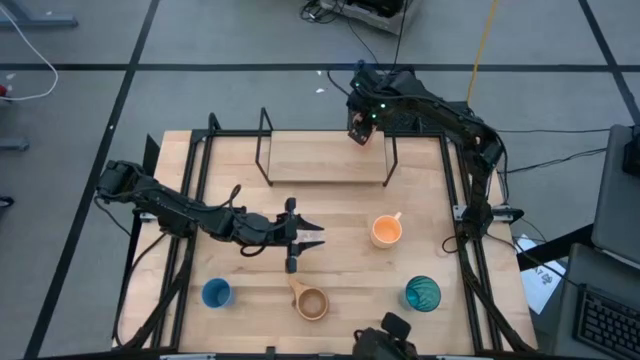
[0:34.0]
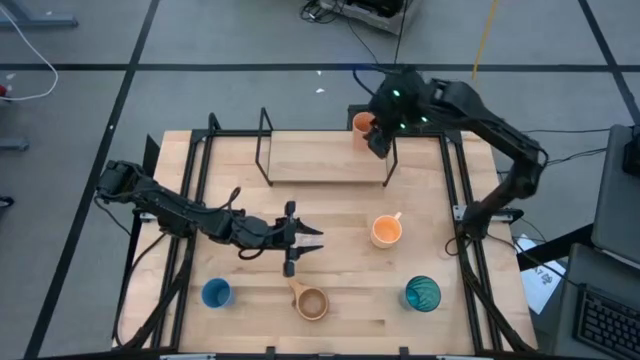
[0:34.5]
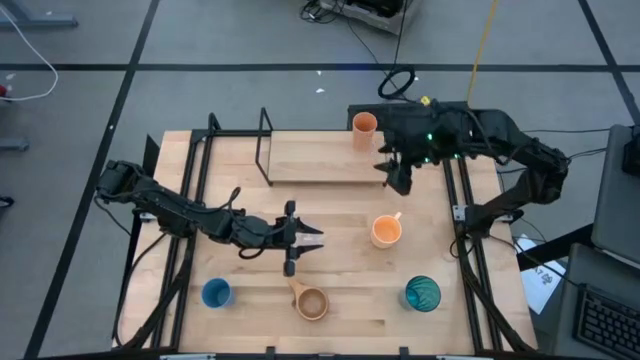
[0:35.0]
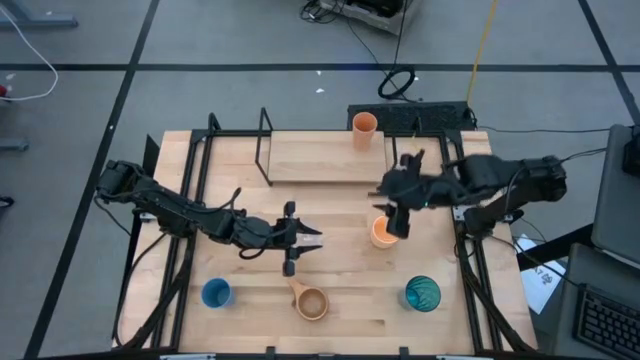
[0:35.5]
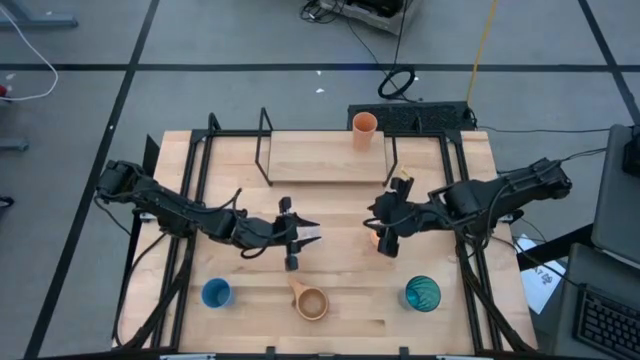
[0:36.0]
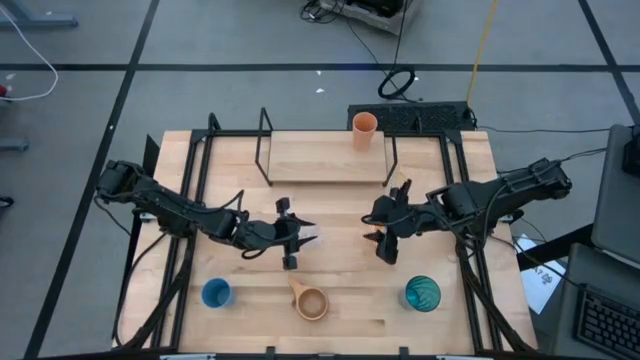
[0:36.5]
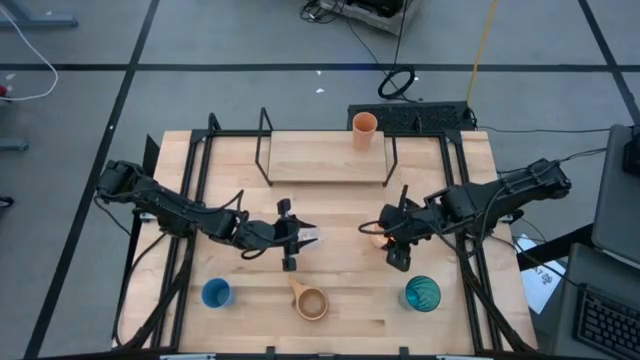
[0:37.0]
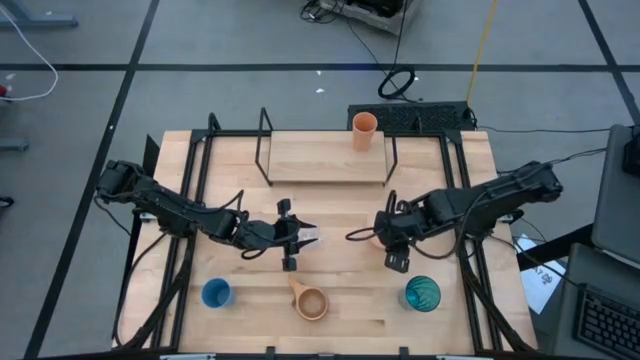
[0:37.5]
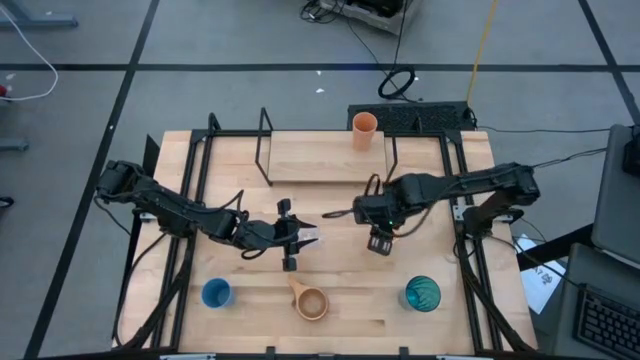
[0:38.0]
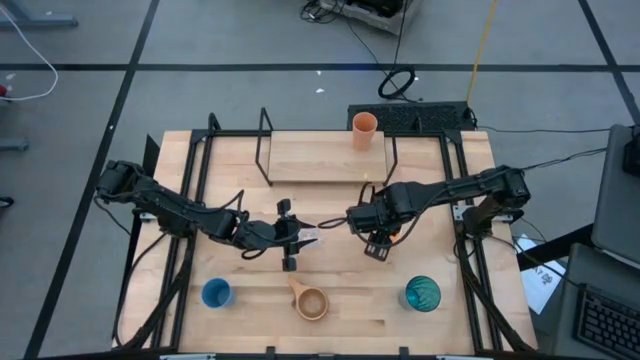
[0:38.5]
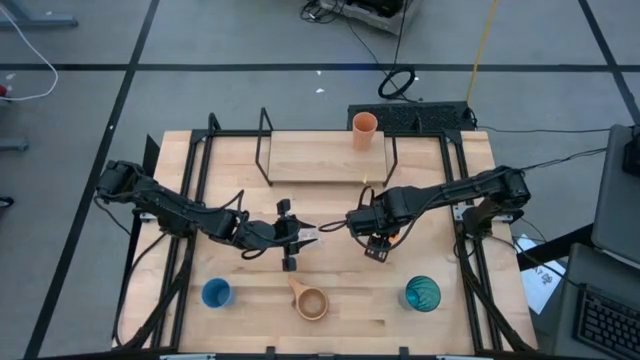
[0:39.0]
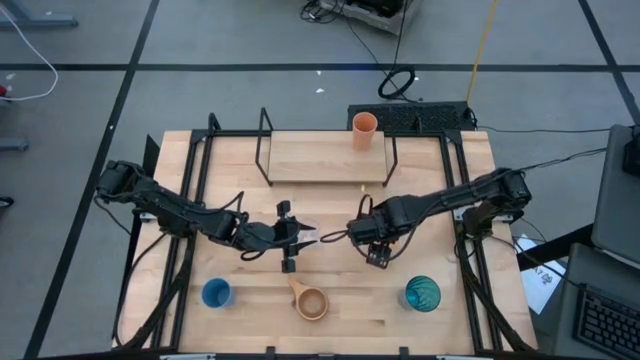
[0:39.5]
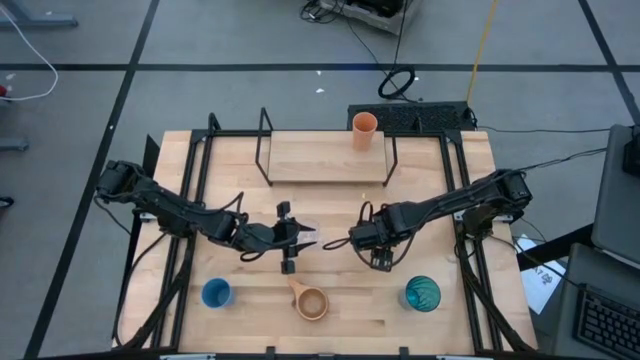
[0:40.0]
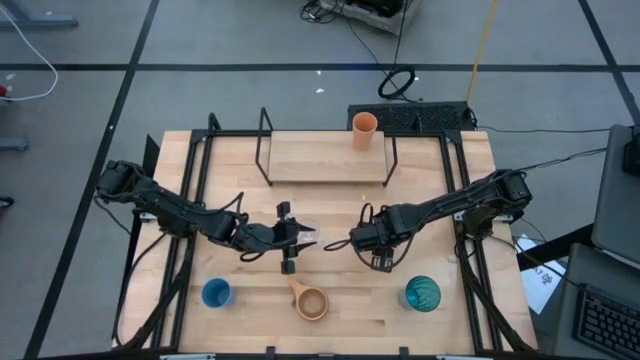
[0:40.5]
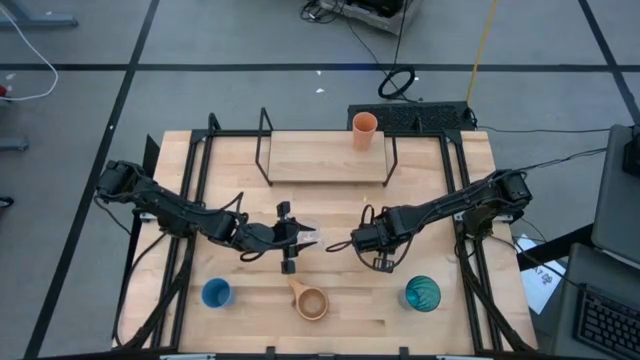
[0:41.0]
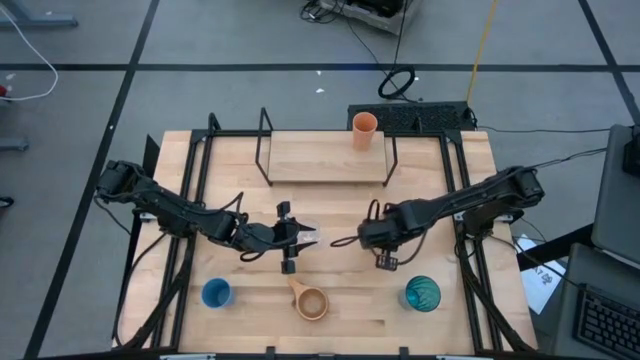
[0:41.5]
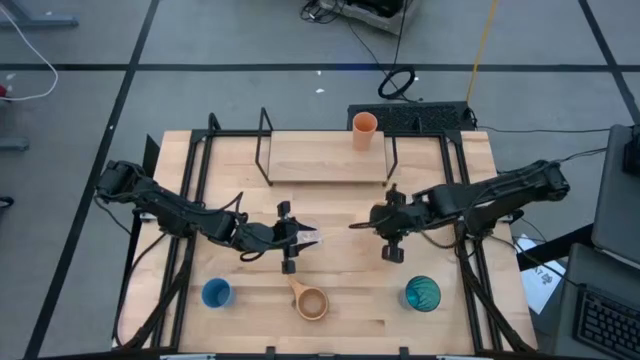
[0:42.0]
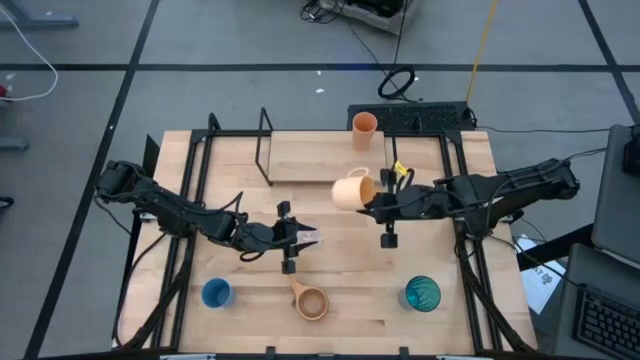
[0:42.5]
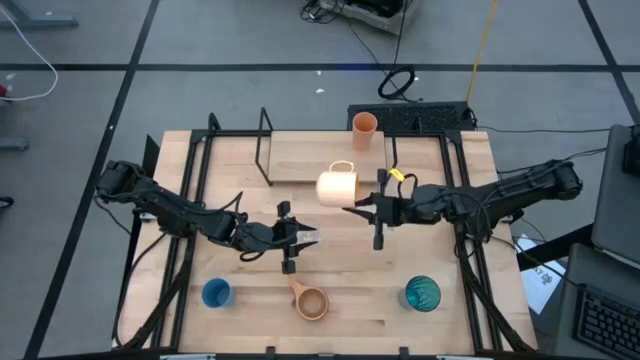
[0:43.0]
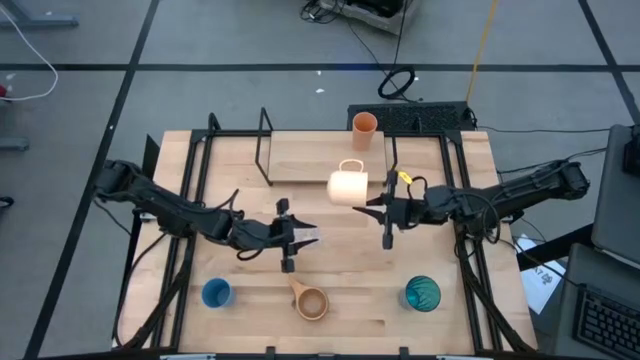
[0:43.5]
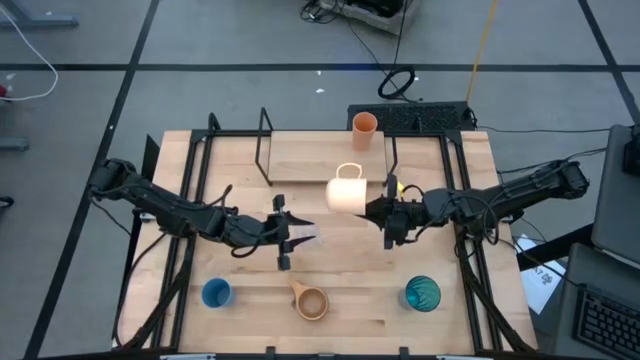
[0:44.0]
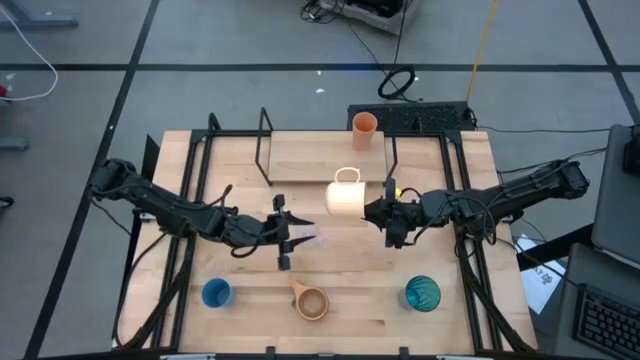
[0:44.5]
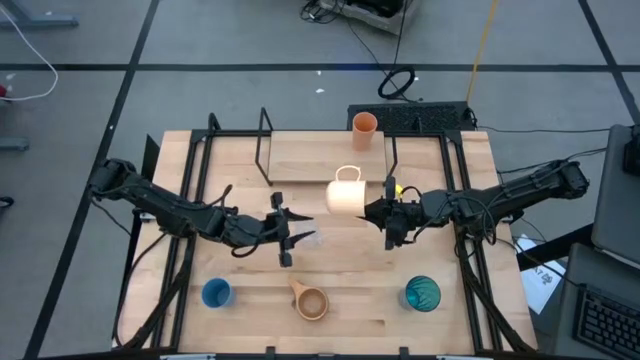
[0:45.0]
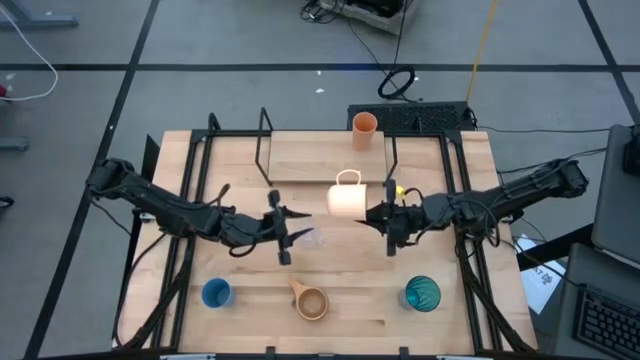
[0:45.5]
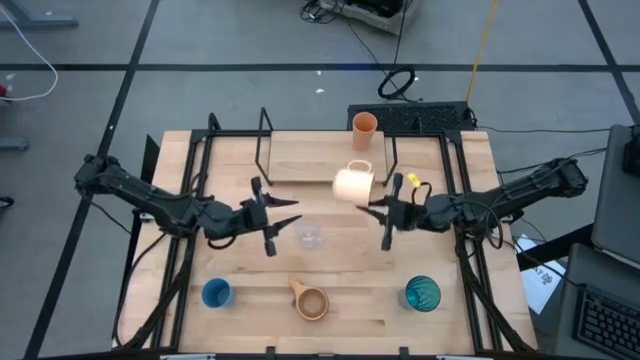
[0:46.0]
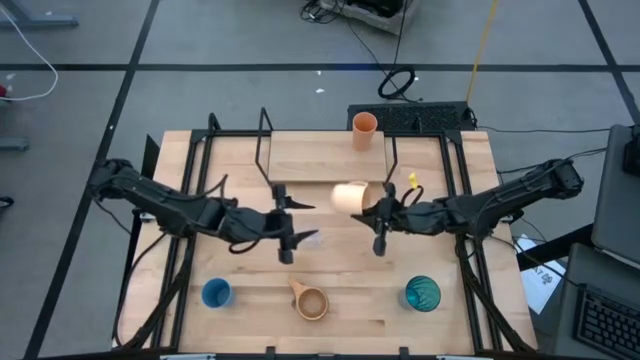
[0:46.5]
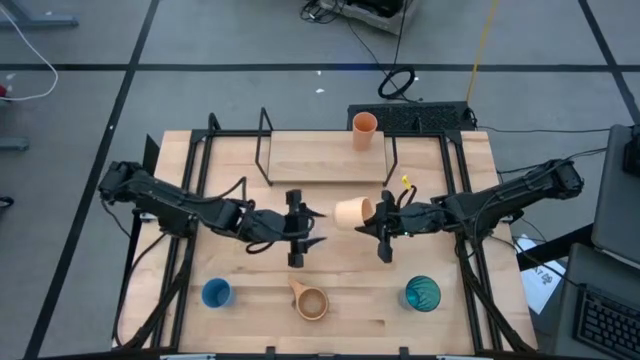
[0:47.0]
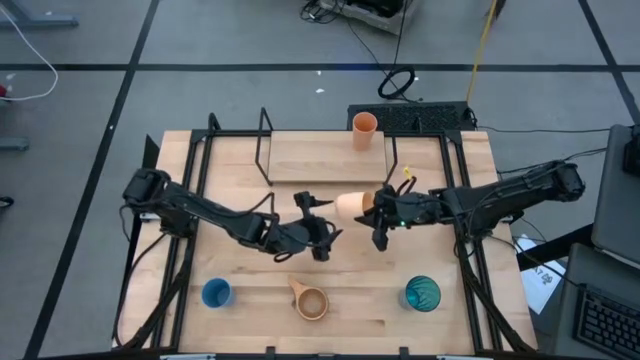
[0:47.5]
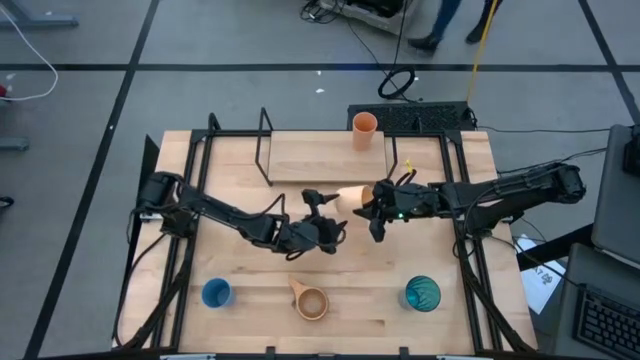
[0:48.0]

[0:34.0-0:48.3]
Task: Stack small to large cups/mugs on shelf
Put the light pink mug on the shelf

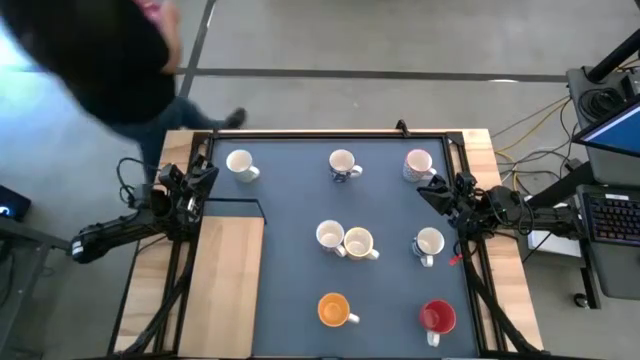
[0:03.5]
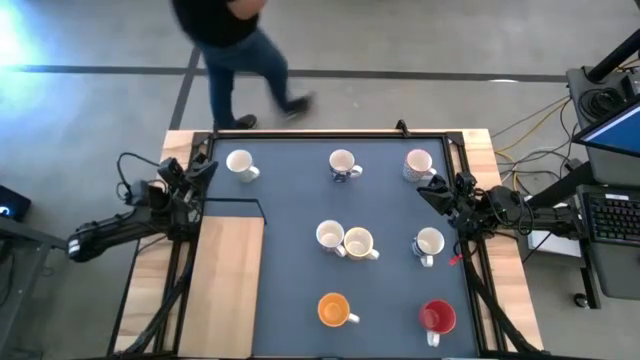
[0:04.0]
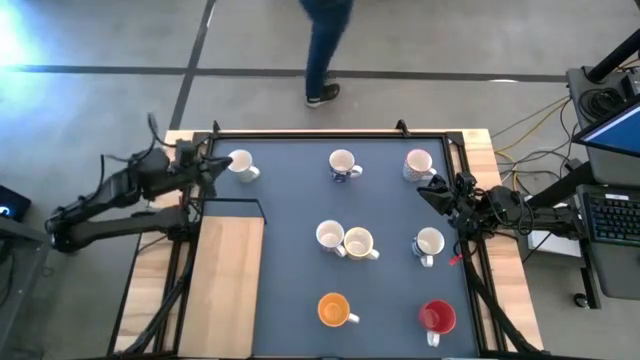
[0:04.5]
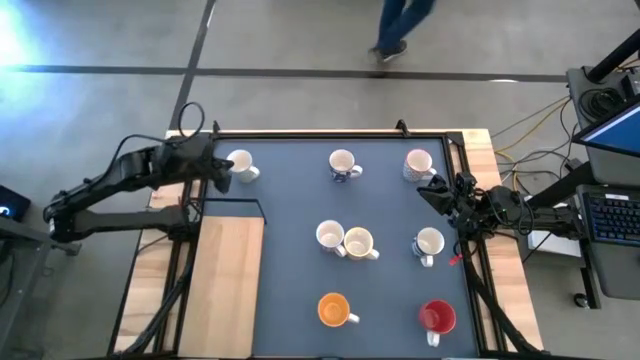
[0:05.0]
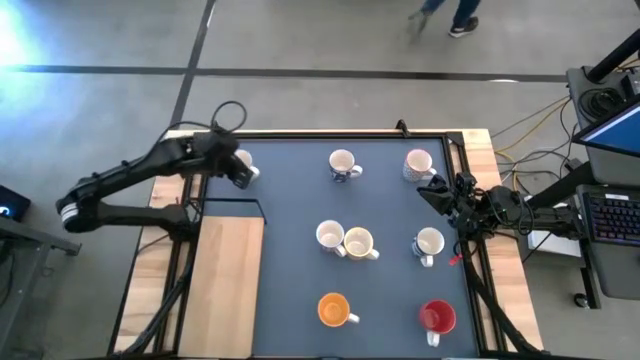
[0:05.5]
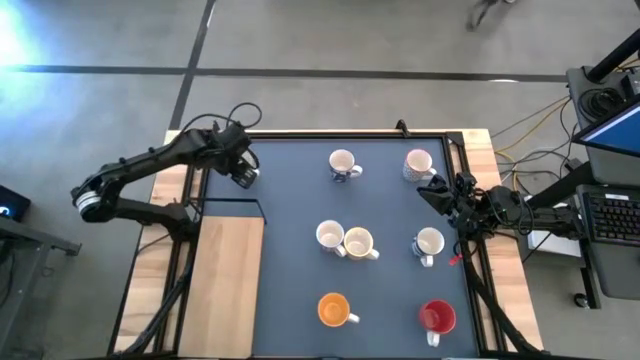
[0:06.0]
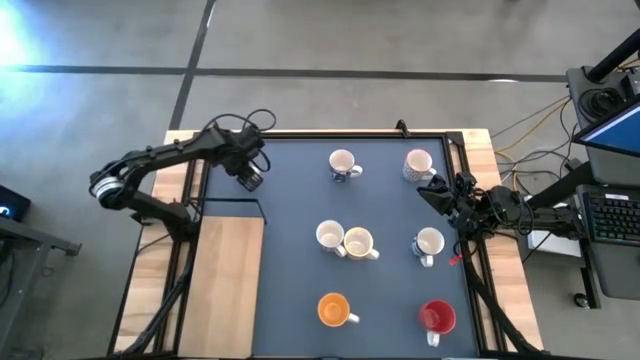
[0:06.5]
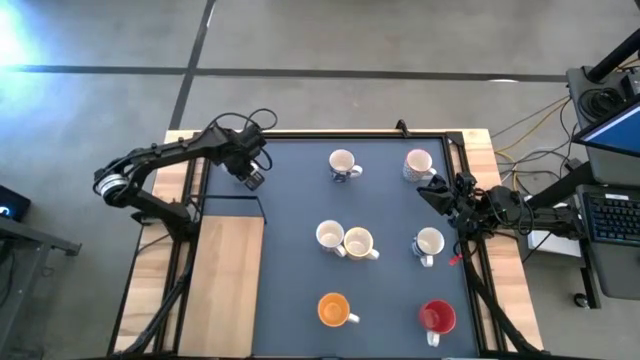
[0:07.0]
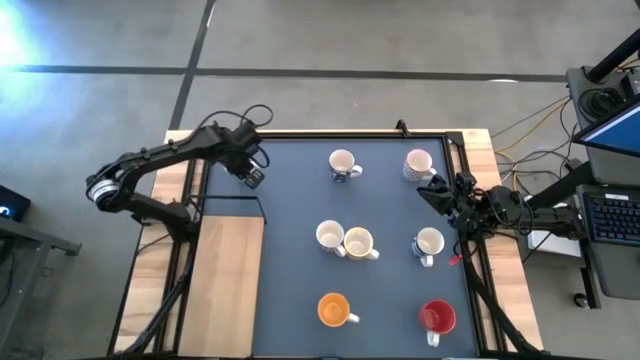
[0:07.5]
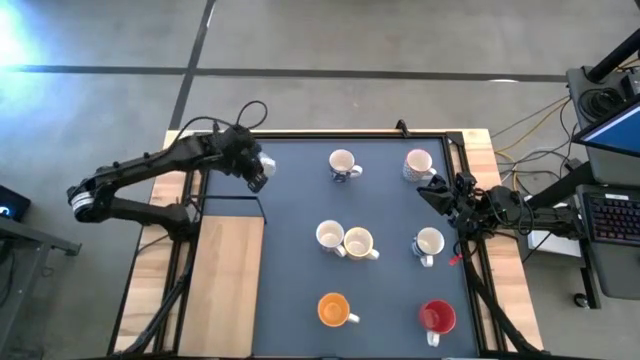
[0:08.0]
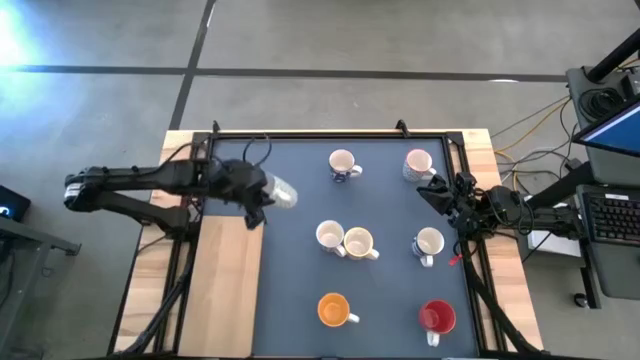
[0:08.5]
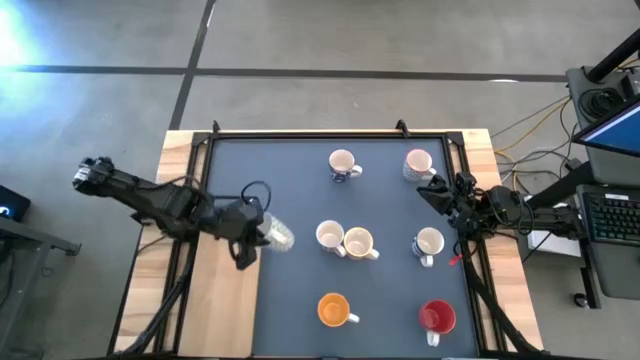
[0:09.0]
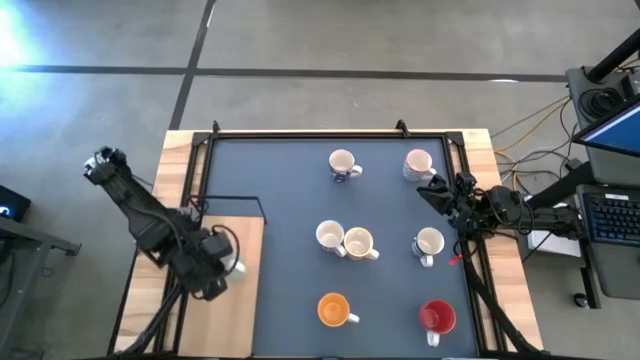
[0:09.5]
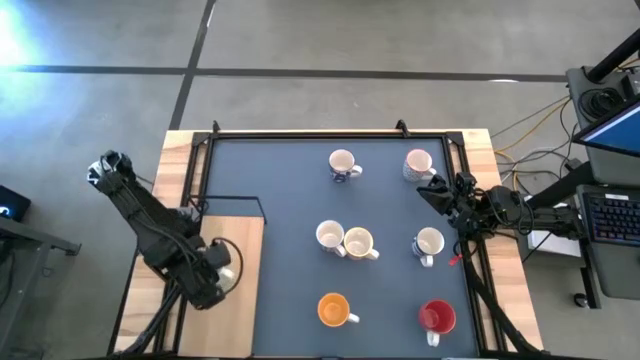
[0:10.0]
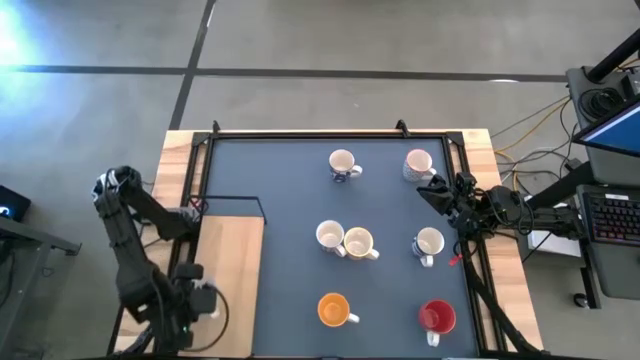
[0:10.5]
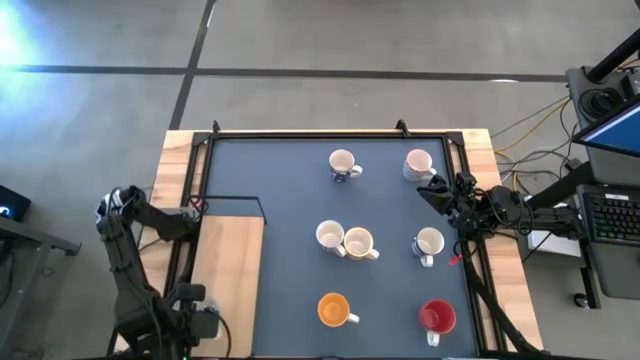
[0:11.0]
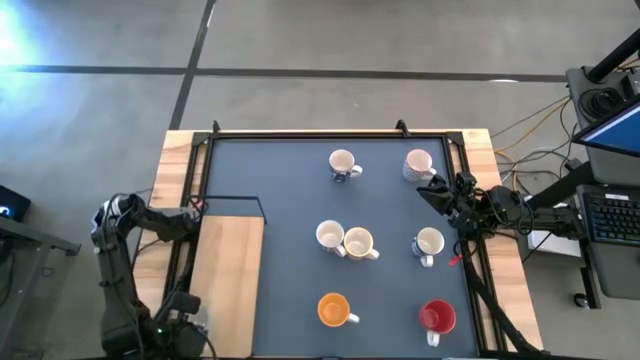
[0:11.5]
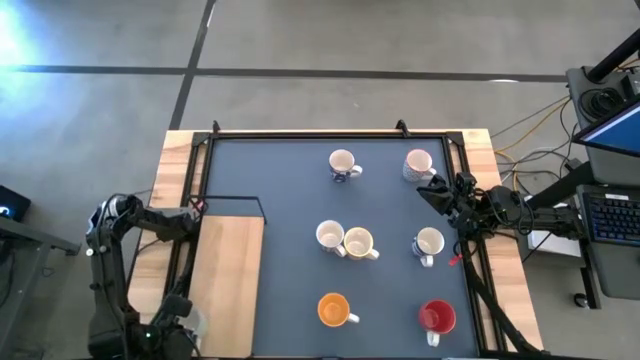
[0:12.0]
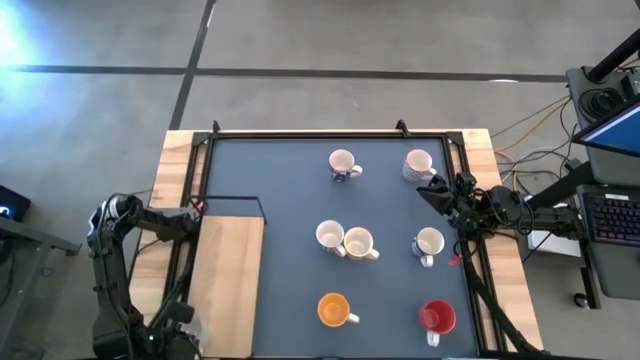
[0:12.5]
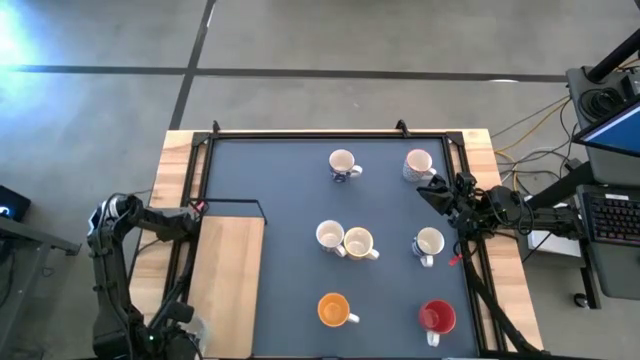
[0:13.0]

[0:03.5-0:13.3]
Task: Place coffee mugs
Put the patterned light green mug on the shelf
